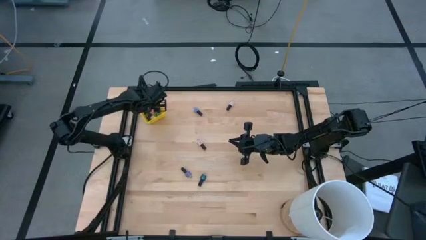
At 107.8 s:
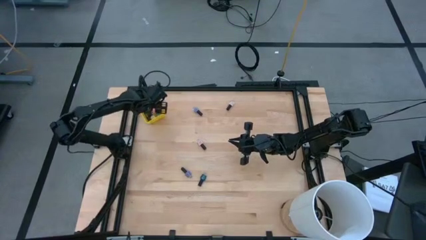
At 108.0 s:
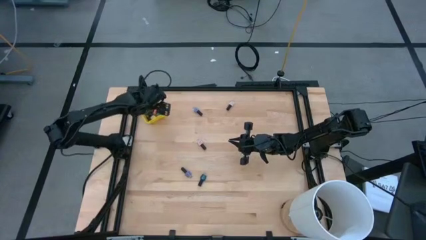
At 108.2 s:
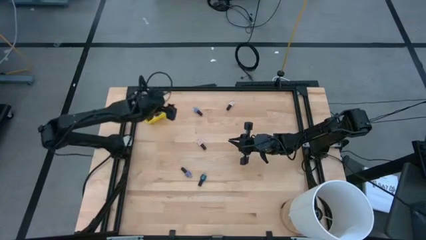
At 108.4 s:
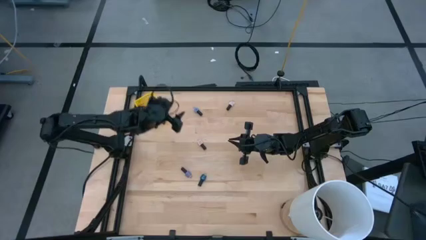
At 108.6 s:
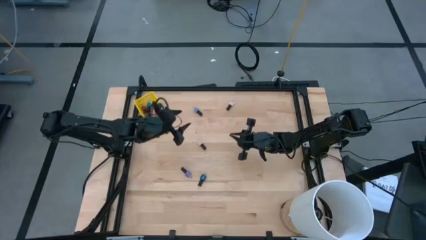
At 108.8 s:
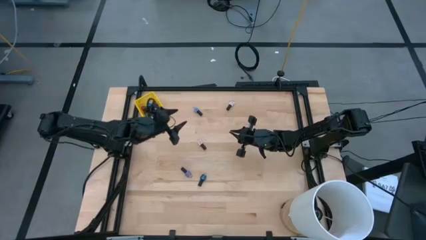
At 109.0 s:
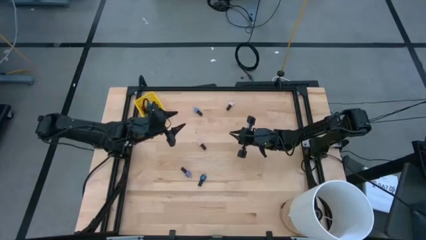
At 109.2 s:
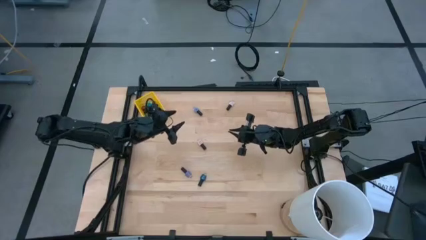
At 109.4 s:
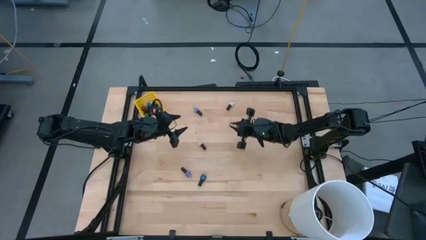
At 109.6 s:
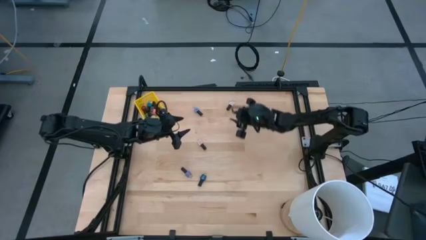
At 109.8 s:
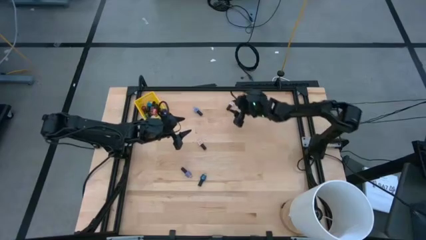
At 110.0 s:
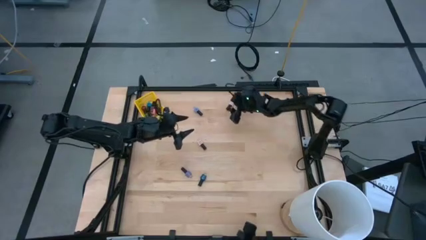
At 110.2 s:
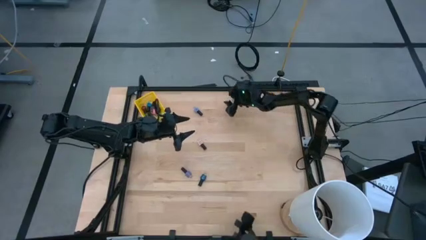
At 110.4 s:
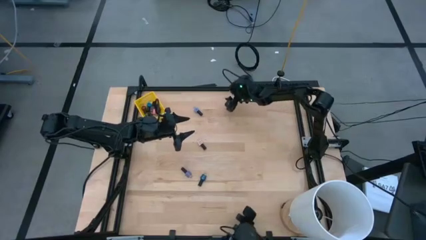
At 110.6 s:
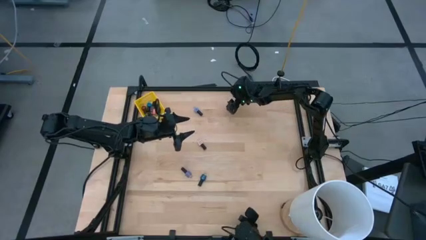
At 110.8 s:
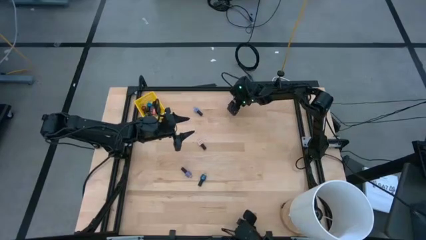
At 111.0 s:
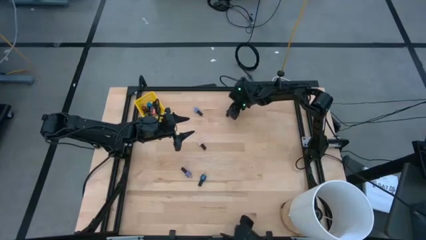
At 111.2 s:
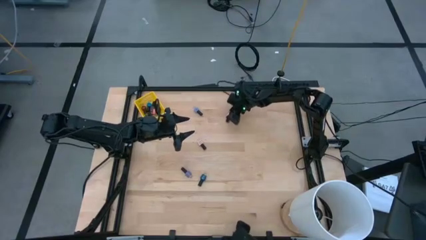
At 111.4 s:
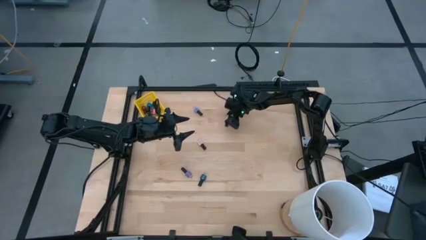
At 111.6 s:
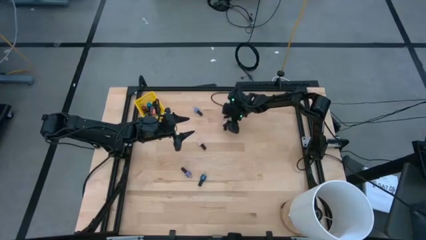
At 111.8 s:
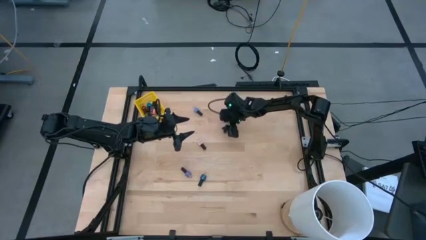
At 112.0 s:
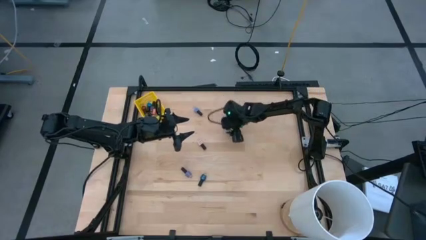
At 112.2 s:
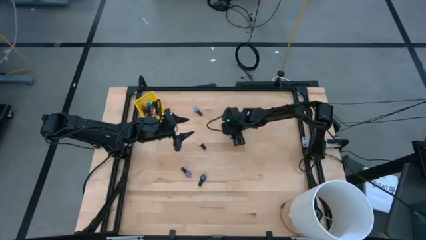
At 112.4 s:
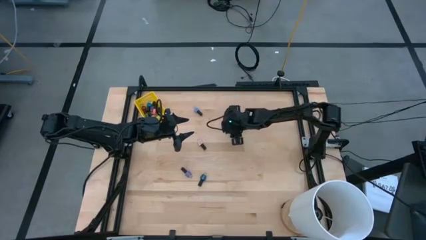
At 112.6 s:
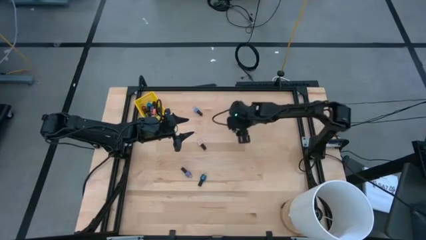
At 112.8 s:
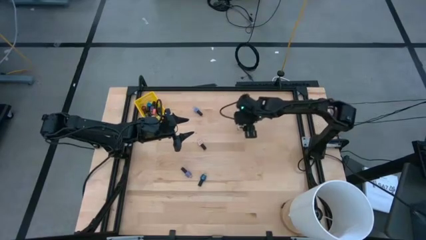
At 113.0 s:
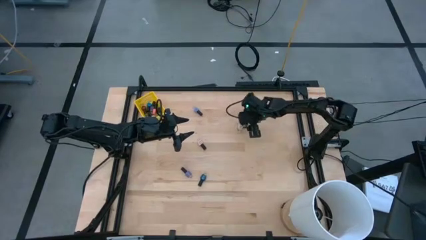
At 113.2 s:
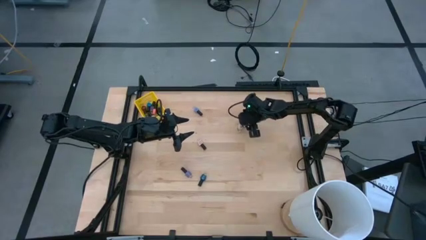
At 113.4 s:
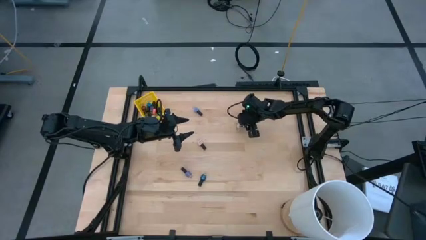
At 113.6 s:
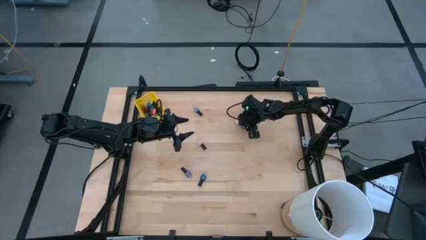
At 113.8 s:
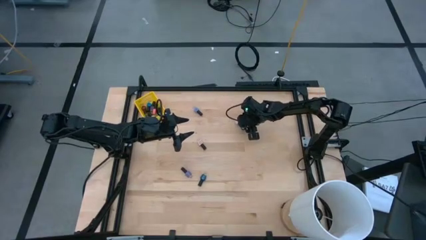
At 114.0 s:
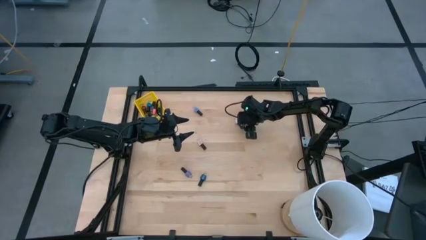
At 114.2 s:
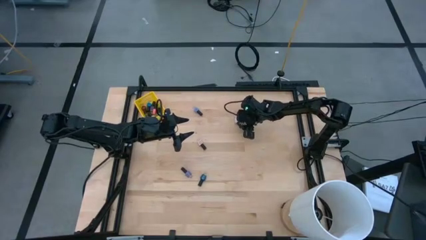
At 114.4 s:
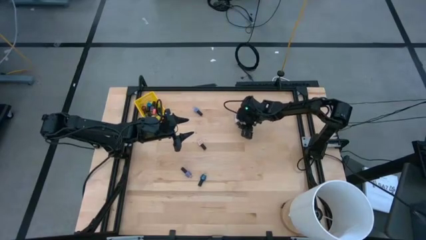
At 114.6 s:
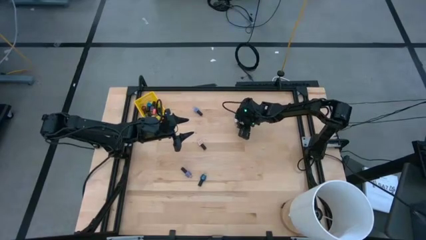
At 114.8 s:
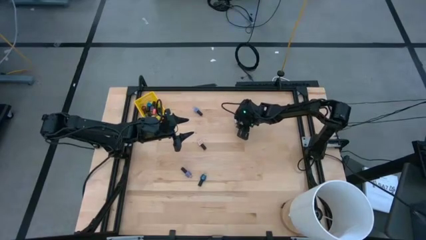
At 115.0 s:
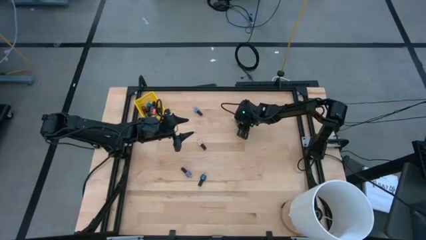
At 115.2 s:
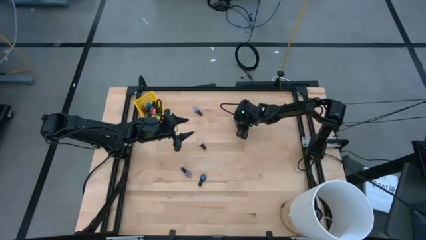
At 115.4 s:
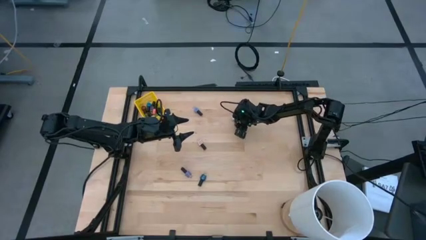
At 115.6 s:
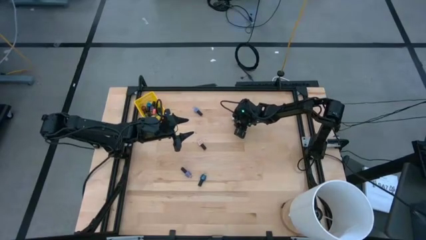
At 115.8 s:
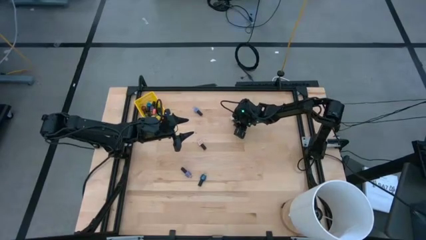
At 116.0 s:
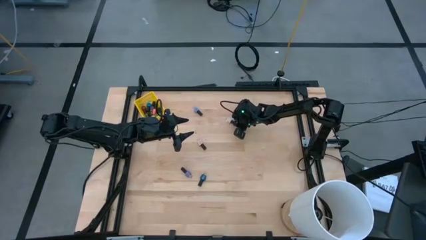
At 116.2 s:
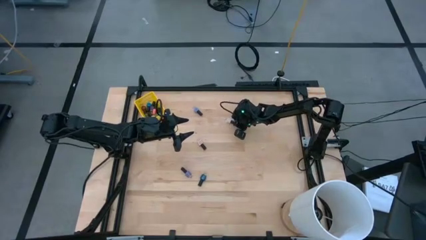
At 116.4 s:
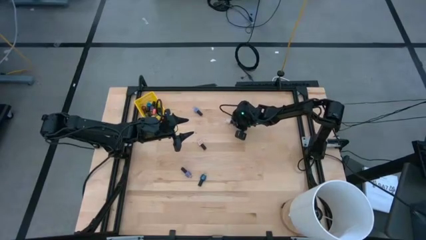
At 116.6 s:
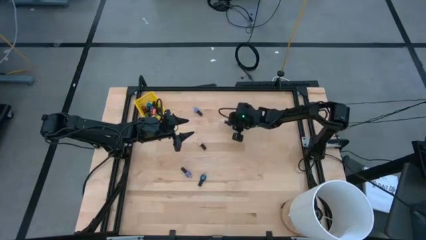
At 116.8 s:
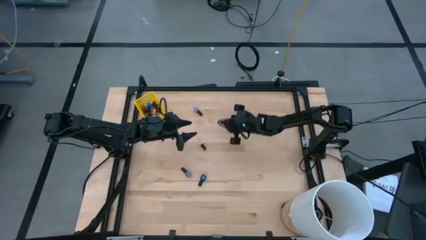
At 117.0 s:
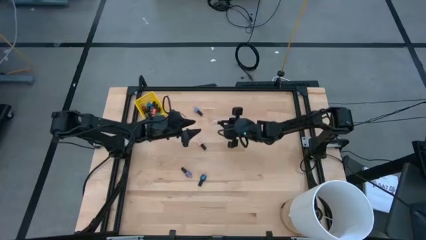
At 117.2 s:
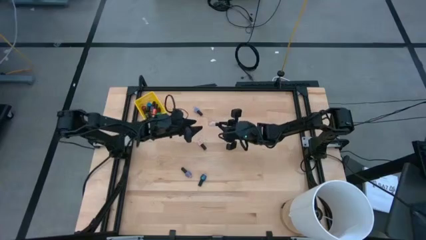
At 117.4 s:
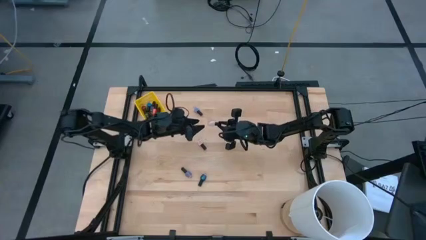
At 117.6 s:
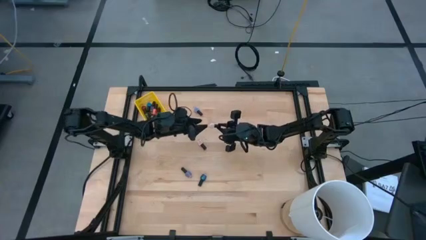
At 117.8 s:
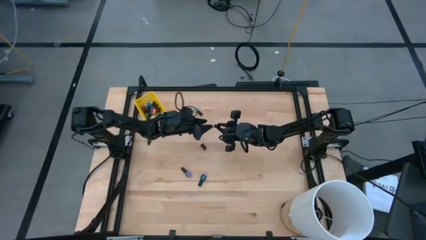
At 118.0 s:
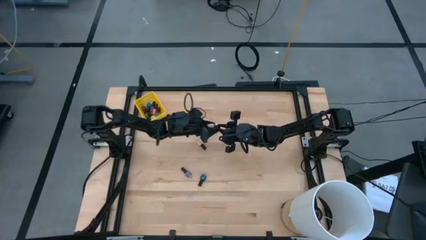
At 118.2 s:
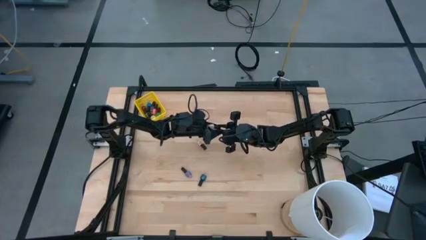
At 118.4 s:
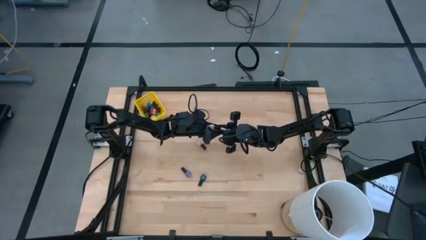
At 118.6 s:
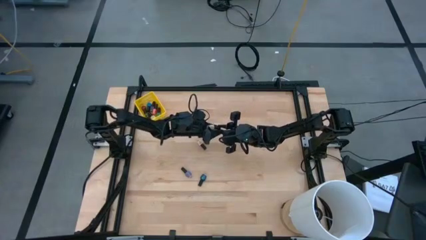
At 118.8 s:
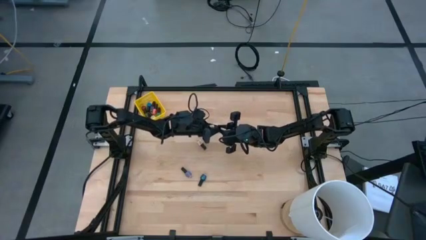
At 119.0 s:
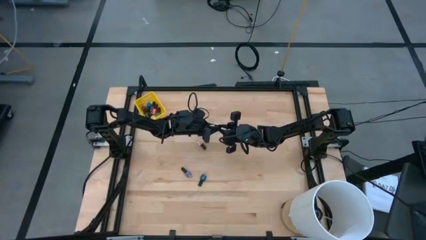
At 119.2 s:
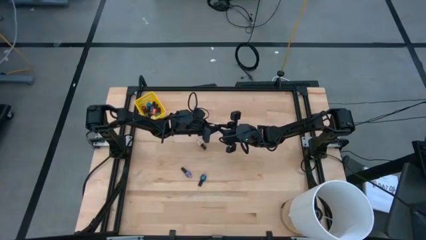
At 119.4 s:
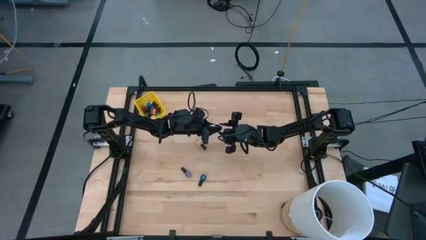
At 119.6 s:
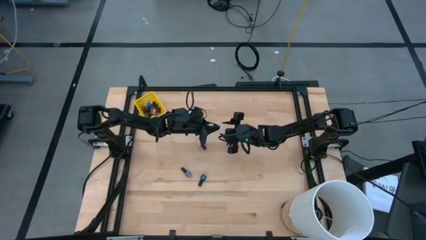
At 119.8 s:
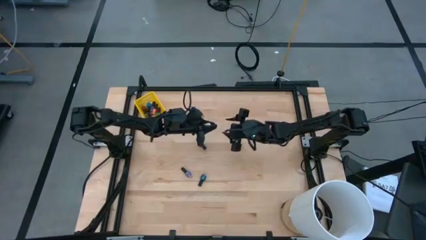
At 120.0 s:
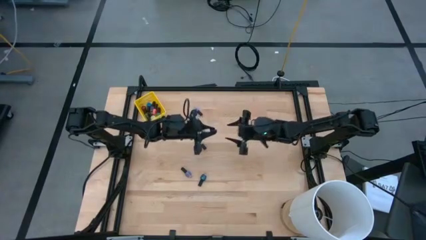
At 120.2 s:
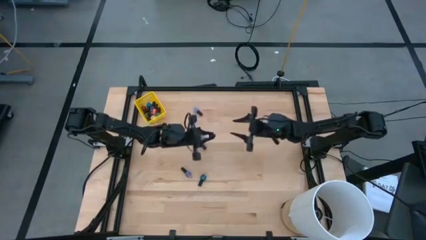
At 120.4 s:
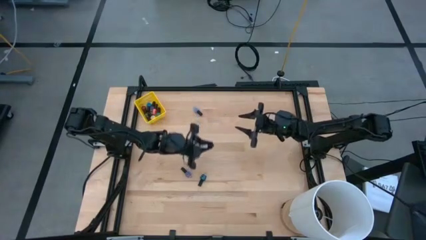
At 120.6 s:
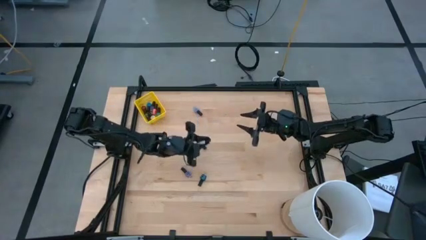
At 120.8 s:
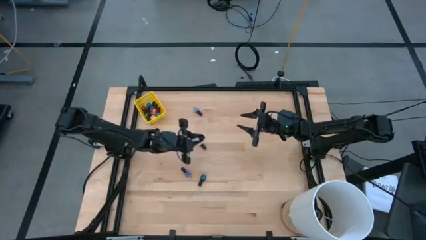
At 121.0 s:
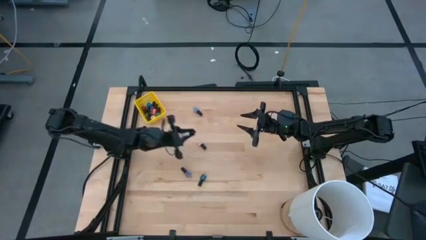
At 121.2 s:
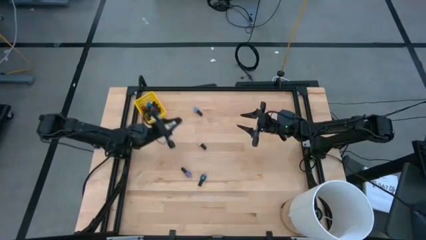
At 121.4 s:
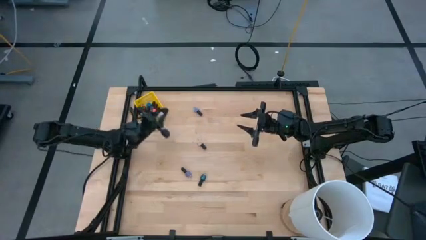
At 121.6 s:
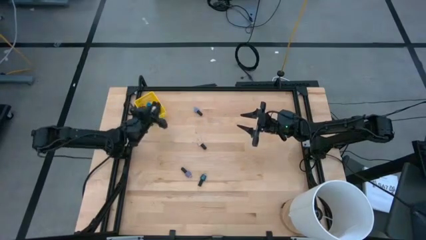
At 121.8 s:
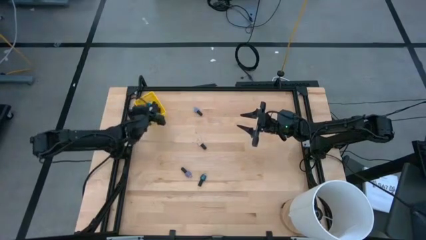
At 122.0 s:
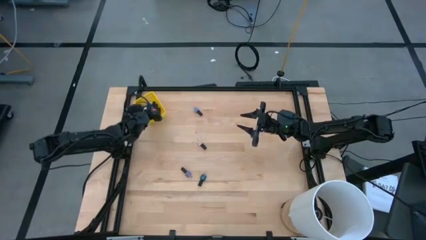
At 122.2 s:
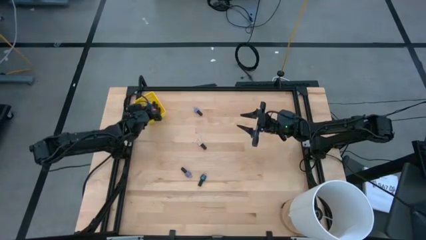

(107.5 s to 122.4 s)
Task: Pick & Place Nail Polish
Put the white nail polish into the yellow bin

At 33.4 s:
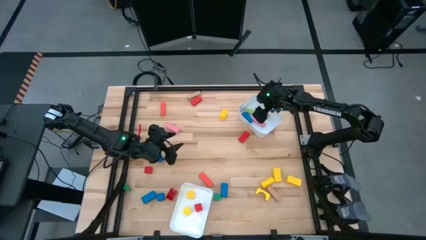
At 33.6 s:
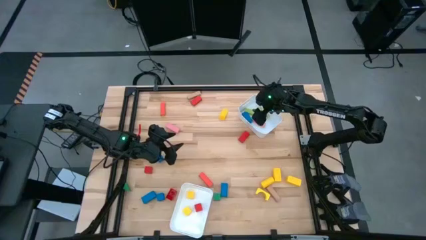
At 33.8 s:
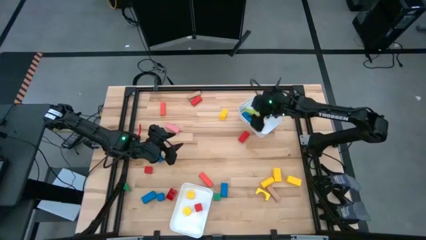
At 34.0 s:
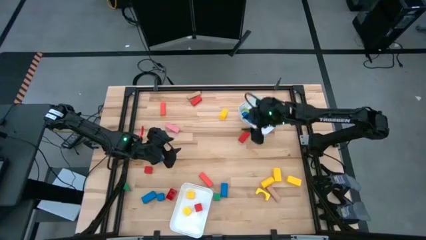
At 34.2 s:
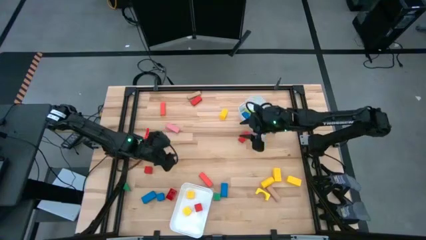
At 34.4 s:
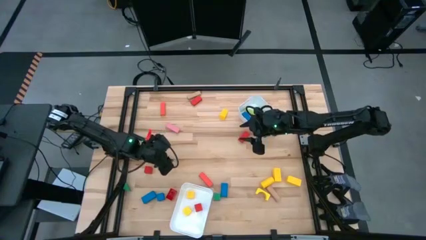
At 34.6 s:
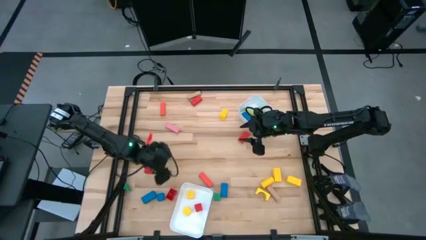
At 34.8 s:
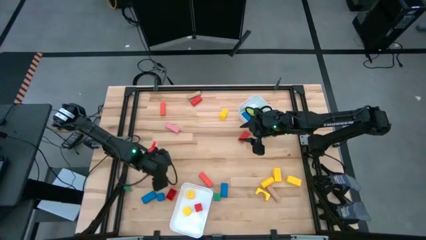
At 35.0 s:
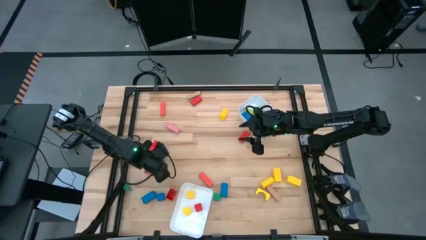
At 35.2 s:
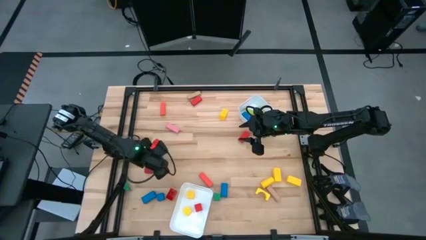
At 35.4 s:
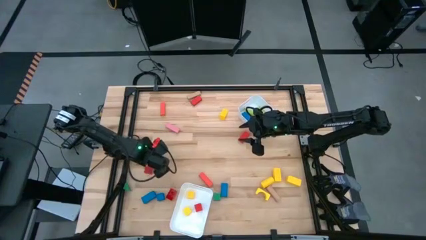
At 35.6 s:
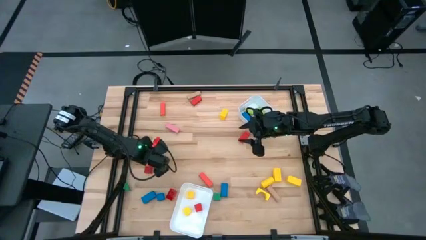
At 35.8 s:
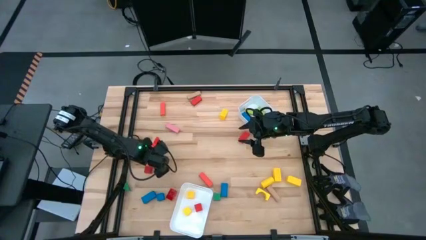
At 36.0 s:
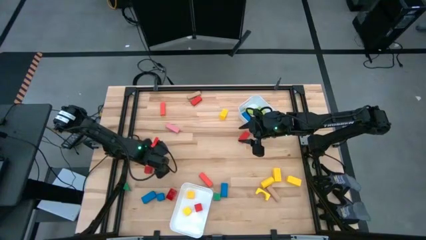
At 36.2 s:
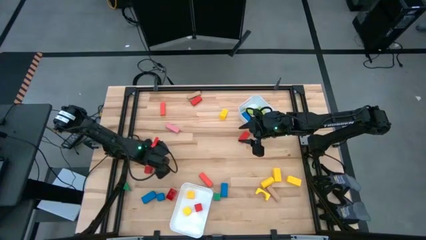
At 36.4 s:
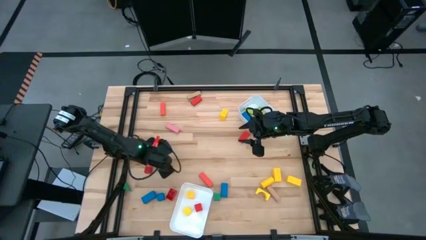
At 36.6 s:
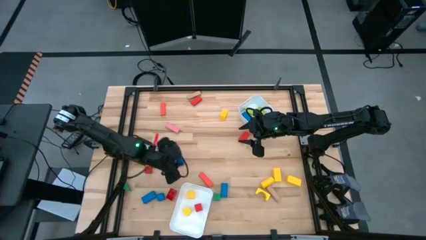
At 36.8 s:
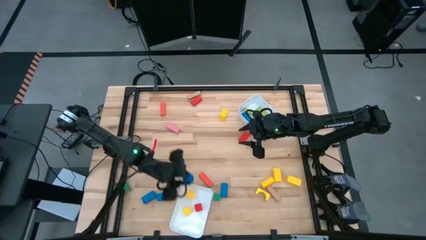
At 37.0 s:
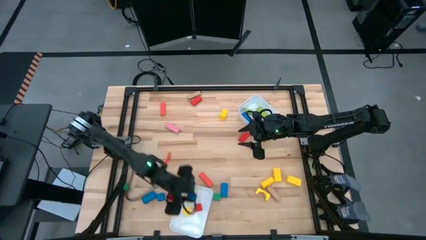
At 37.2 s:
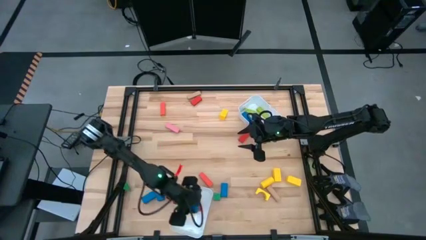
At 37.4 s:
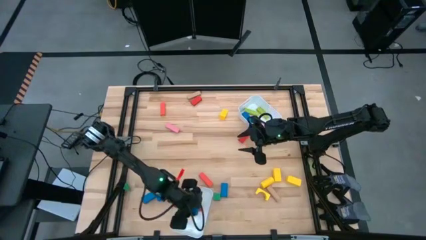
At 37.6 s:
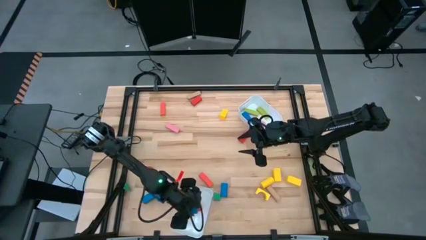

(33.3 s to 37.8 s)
Task: Sort blocks by size
Put the blue square block into the top white bin
